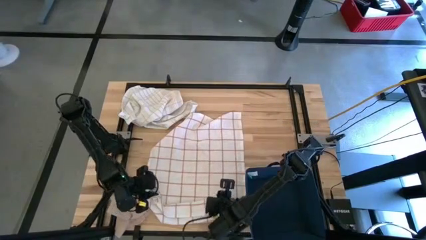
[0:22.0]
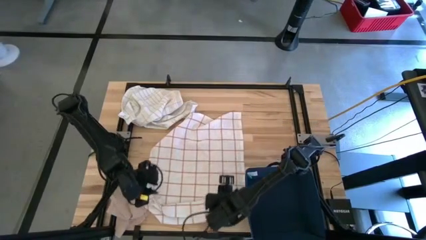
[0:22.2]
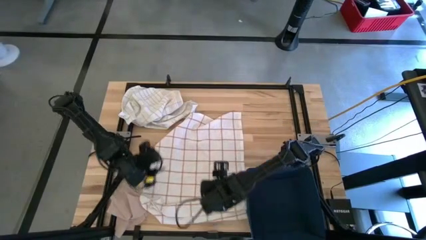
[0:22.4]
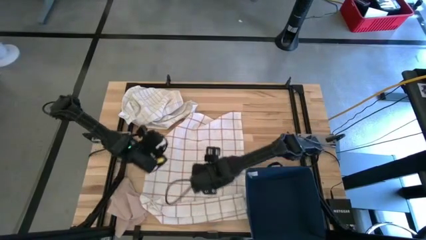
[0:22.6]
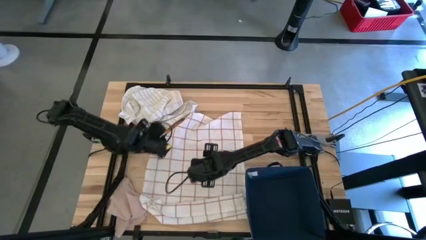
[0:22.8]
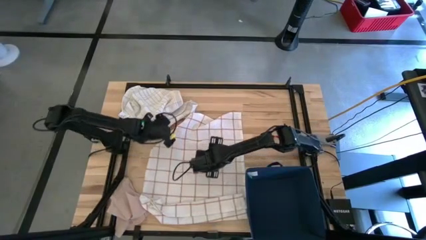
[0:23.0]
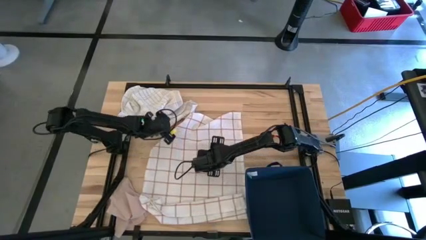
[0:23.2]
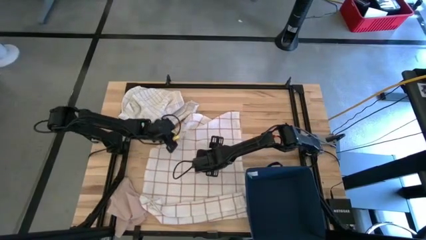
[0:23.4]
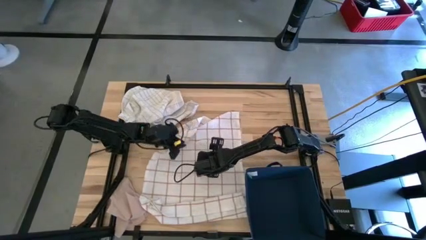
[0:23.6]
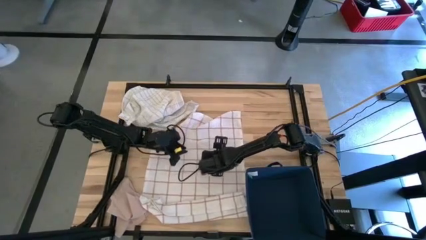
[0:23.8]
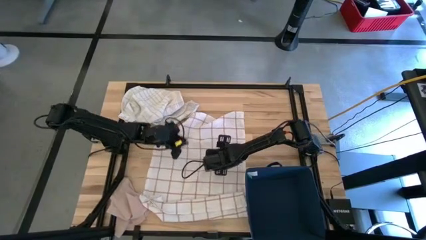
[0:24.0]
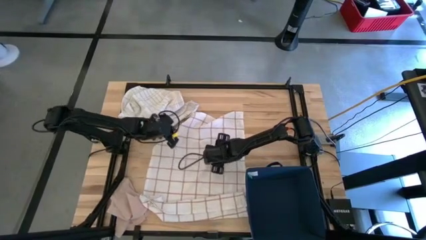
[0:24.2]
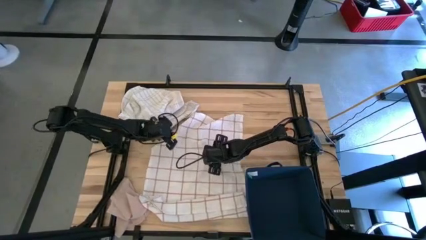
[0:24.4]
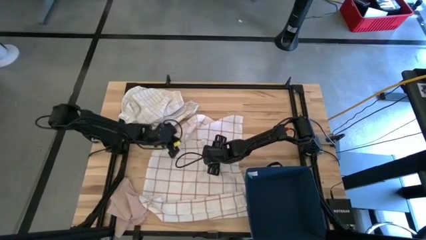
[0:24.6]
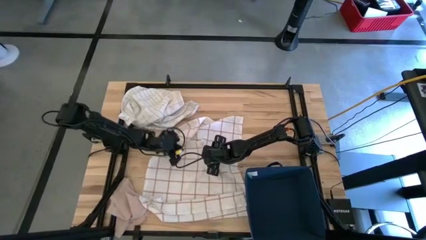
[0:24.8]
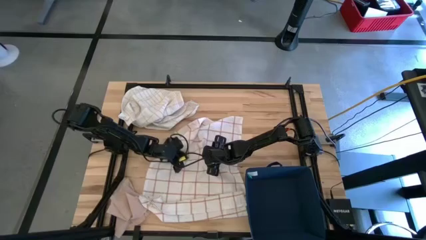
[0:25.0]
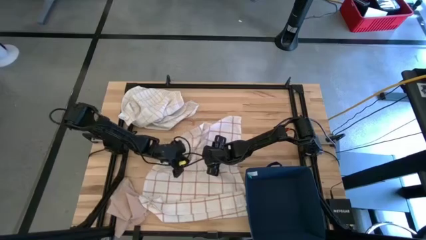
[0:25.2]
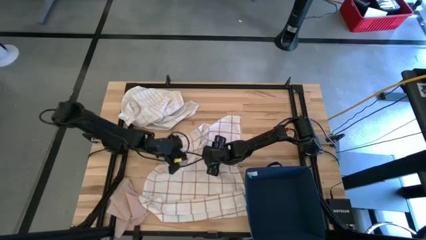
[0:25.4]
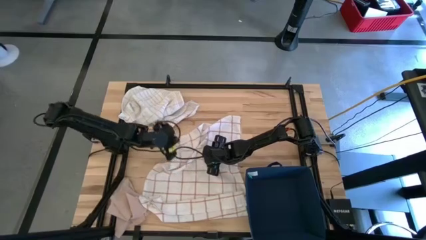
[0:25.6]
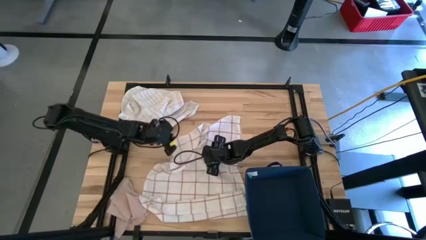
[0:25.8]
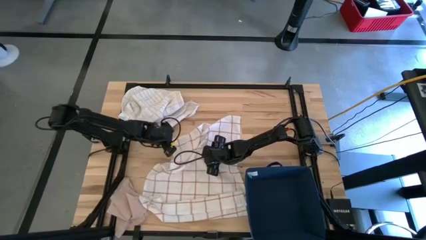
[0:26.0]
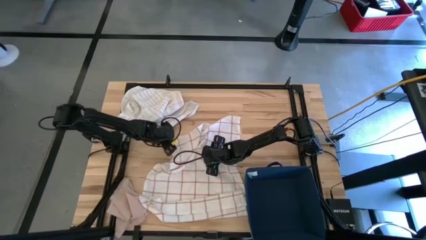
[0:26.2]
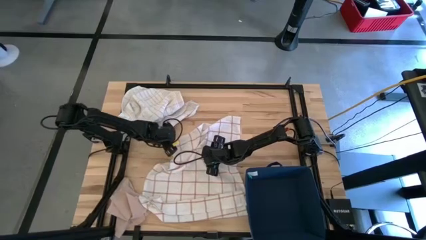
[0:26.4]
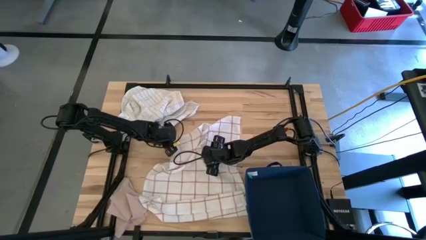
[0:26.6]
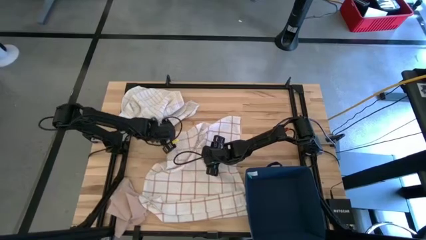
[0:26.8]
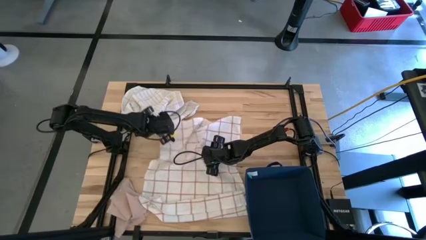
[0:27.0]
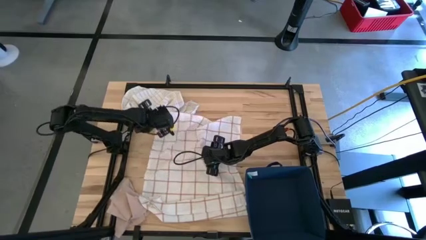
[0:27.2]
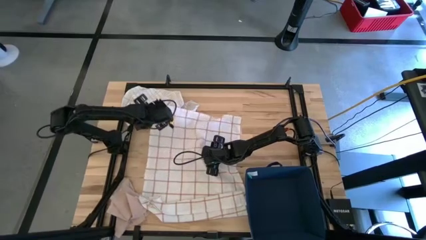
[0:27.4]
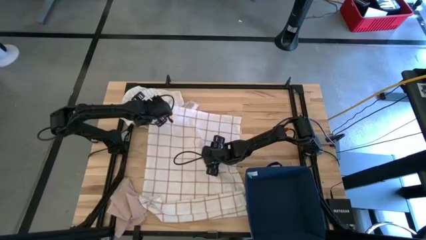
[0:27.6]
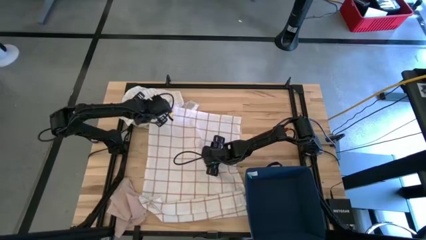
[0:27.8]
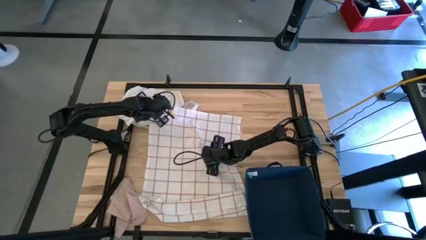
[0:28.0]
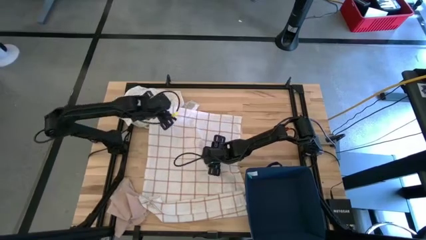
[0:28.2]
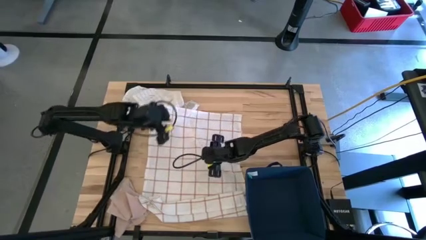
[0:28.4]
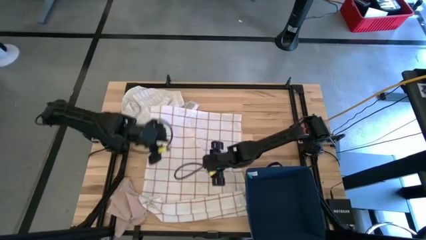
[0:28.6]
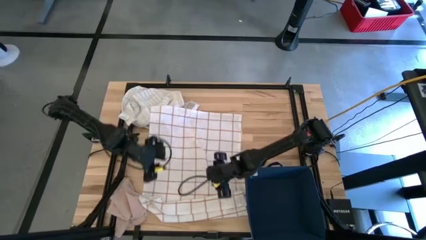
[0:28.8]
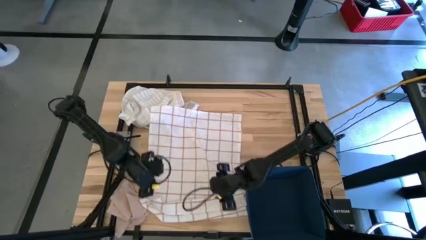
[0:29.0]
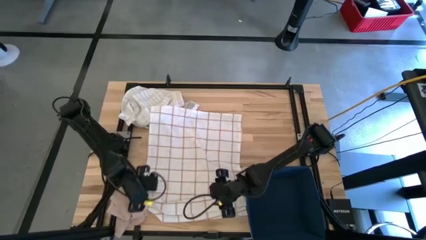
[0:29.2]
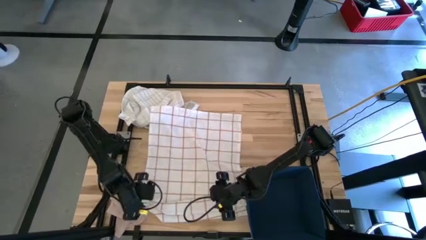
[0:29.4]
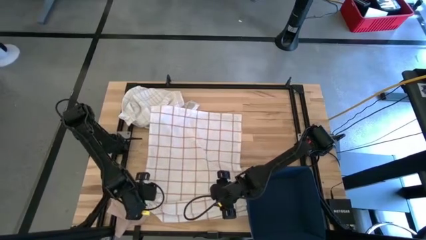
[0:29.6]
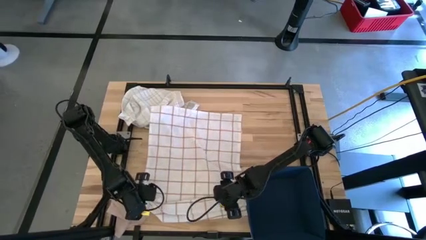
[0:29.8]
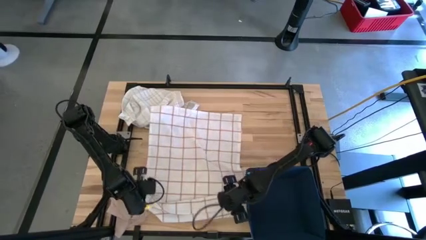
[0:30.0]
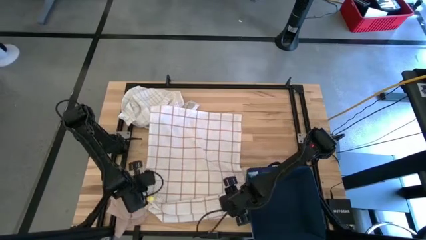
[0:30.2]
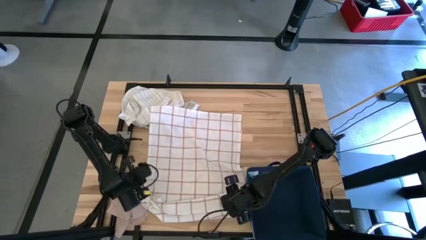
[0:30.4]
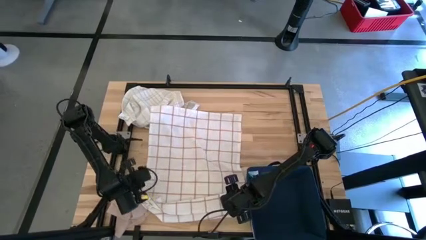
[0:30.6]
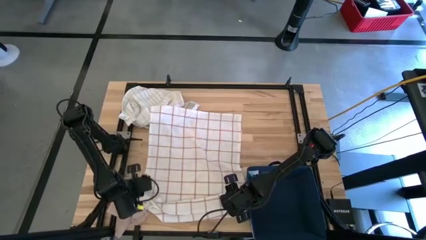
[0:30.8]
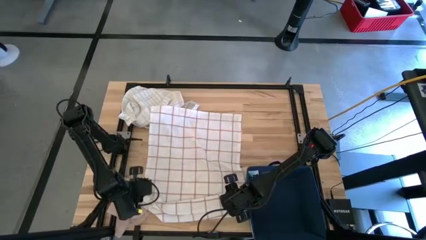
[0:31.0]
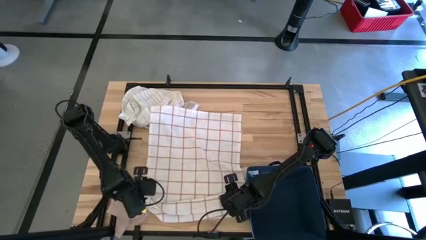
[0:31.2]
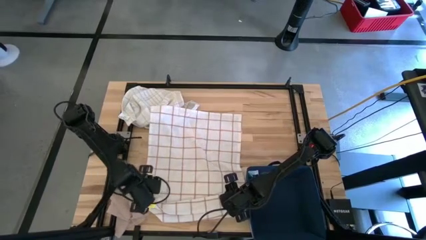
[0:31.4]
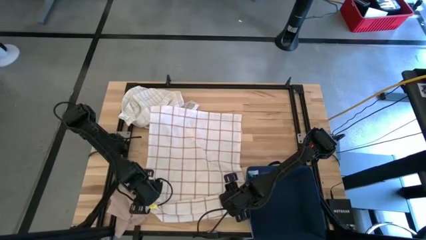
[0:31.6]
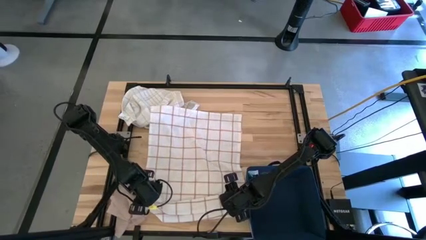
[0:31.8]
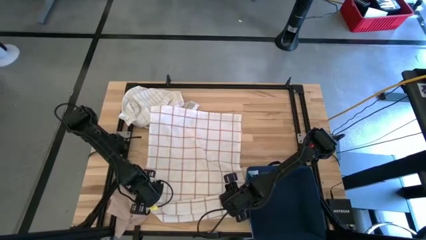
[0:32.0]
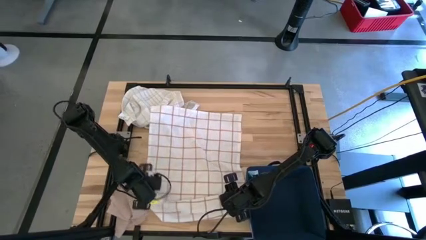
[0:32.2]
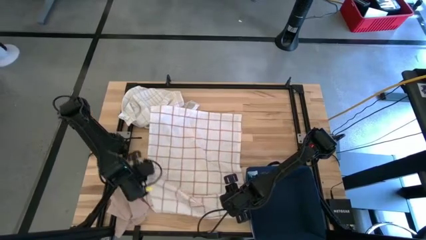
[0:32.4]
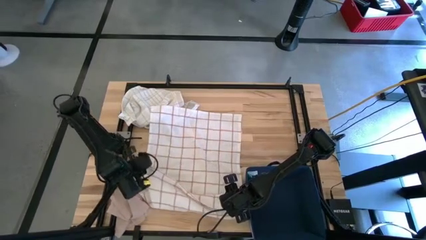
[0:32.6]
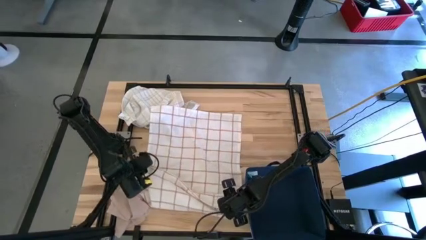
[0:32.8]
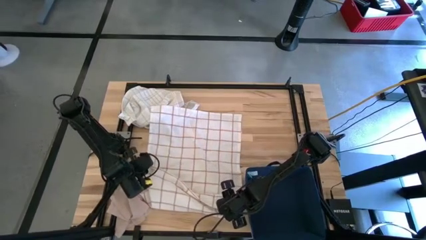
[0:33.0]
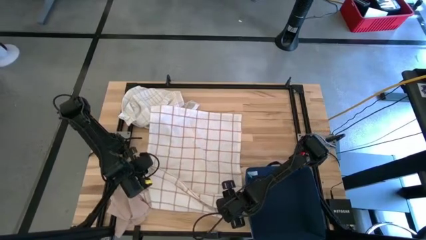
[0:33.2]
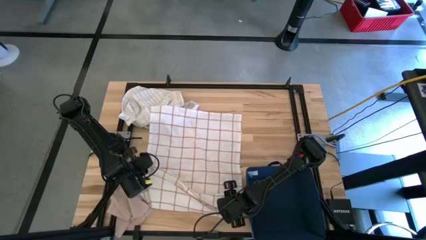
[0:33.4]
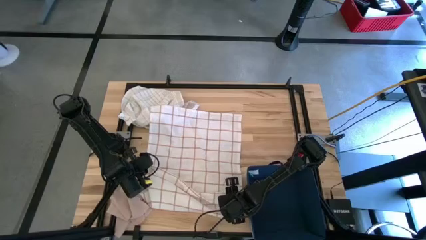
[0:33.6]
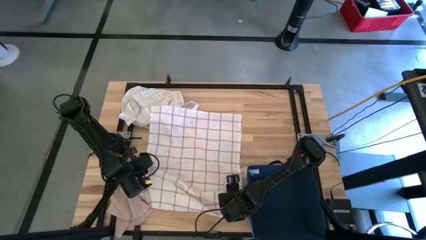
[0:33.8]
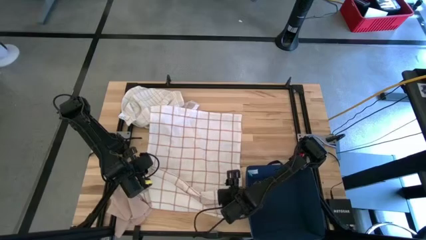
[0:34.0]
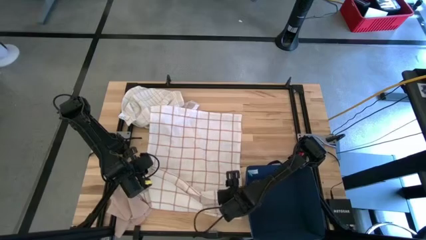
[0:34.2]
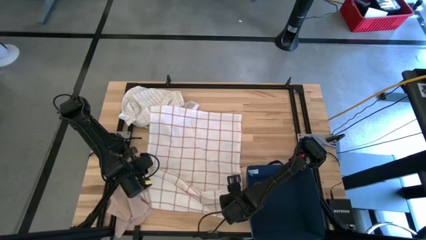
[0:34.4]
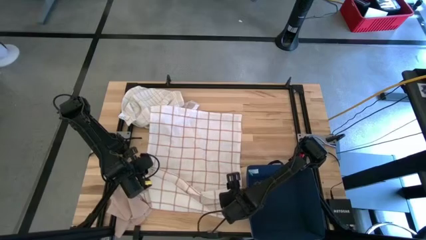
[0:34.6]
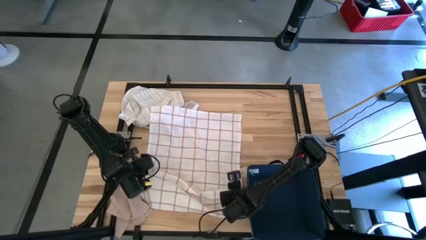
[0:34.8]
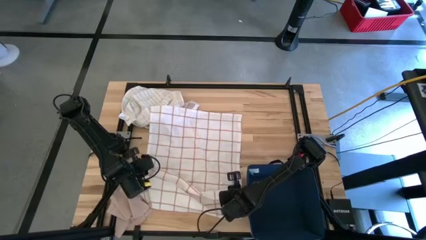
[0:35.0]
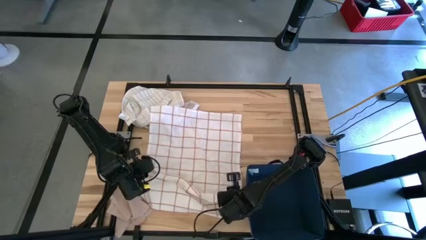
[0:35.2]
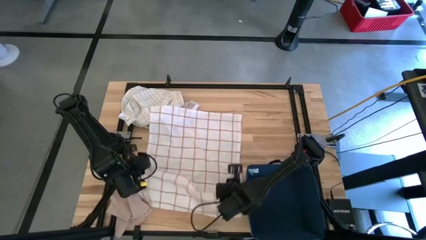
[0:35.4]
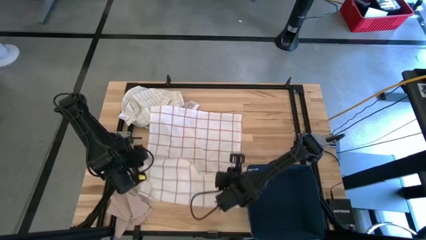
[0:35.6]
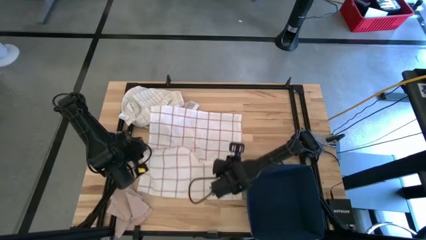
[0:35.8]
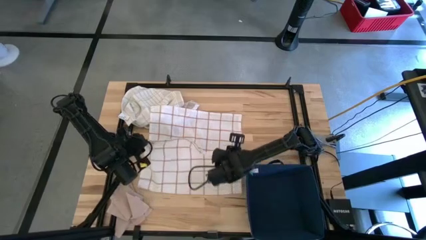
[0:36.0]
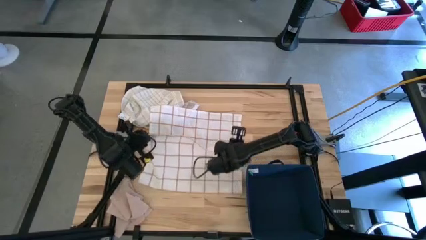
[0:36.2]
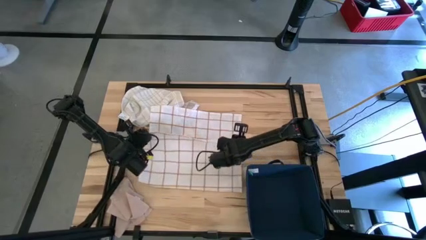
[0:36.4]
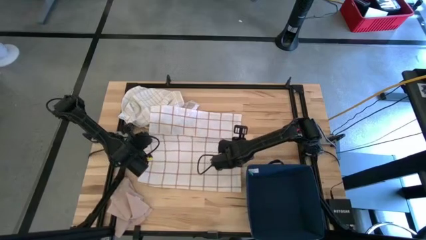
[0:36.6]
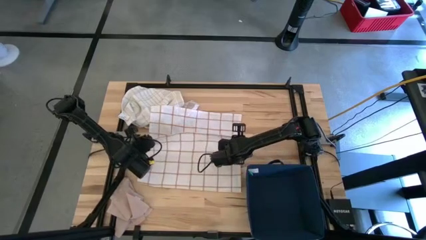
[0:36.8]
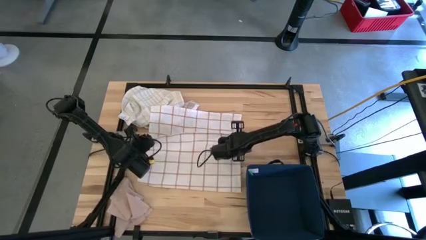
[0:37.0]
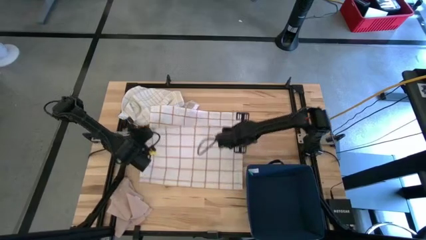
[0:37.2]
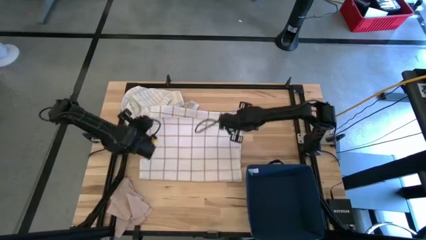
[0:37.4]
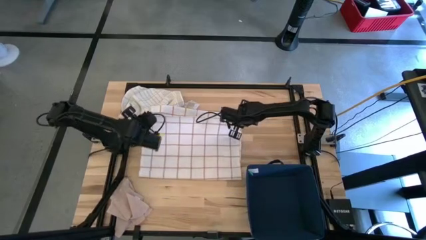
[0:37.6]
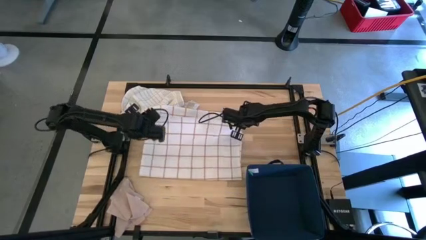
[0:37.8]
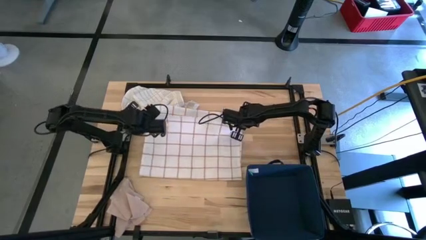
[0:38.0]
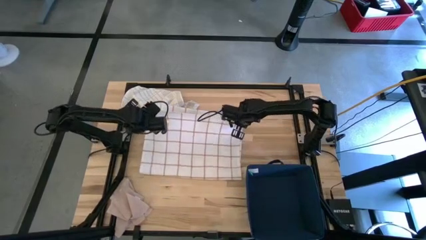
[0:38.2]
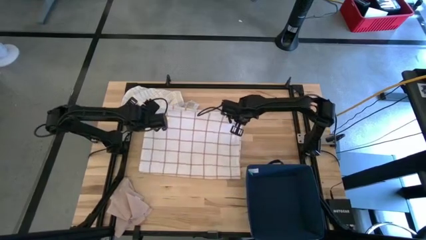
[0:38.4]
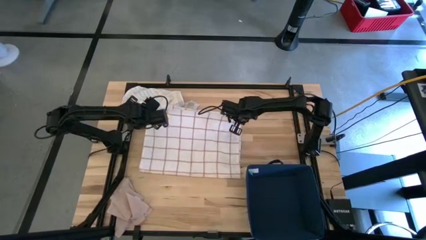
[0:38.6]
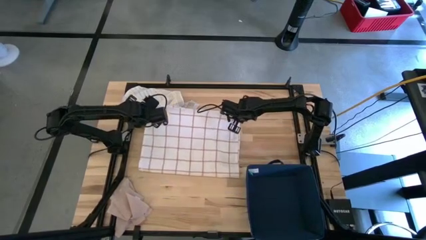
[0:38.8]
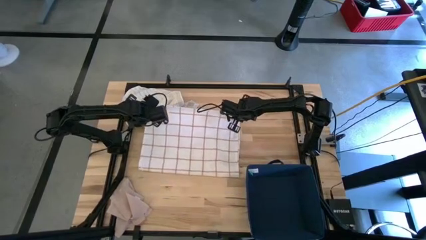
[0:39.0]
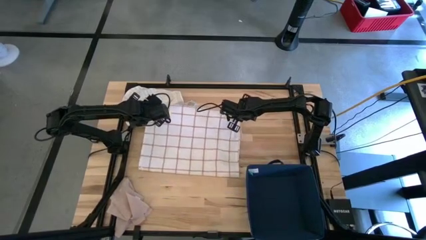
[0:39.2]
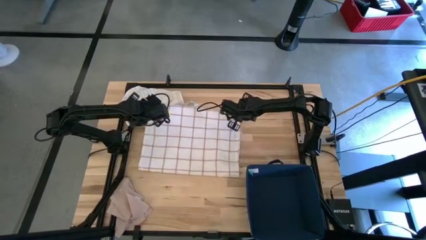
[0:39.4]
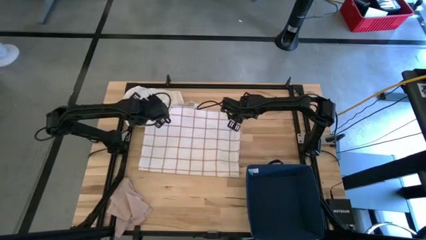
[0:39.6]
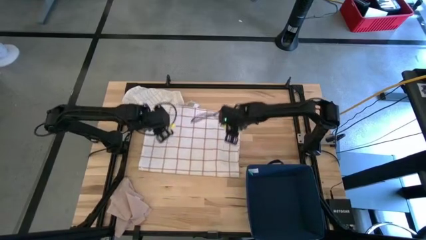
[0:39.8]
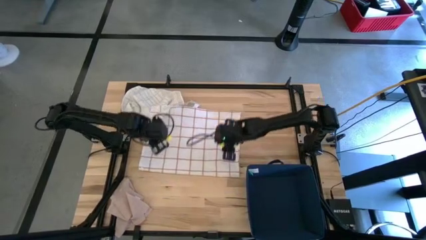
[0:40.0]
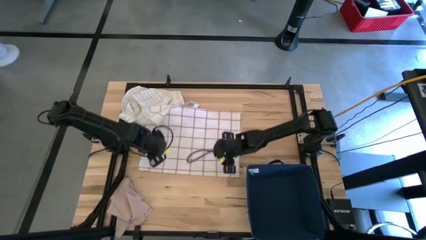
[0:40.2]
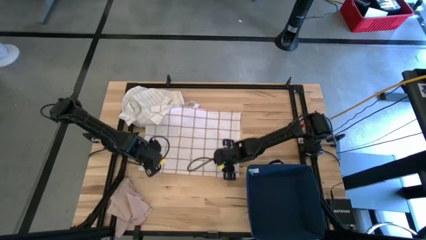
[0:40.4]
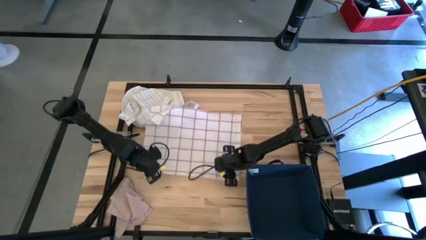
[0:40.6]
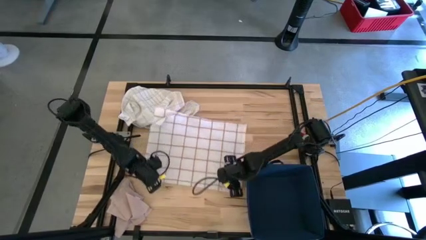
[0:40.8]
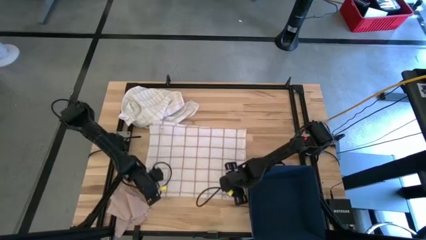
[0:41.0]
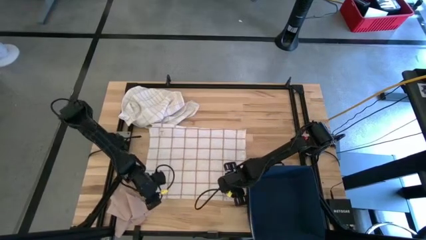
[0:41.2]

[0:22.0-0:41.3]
Task: Fold towel
Fold the white patterned towel
